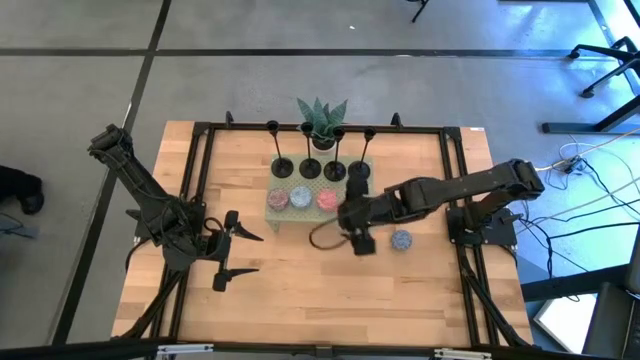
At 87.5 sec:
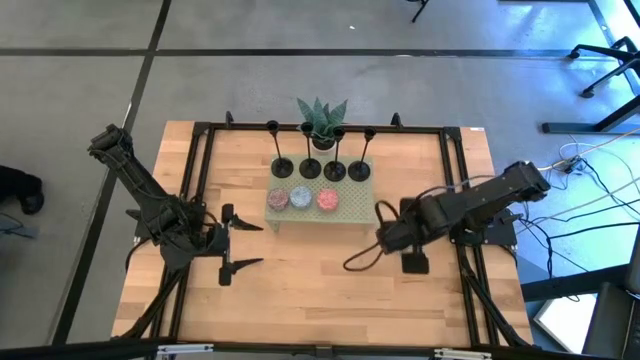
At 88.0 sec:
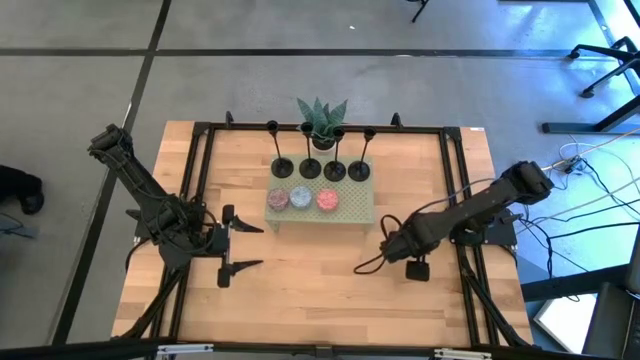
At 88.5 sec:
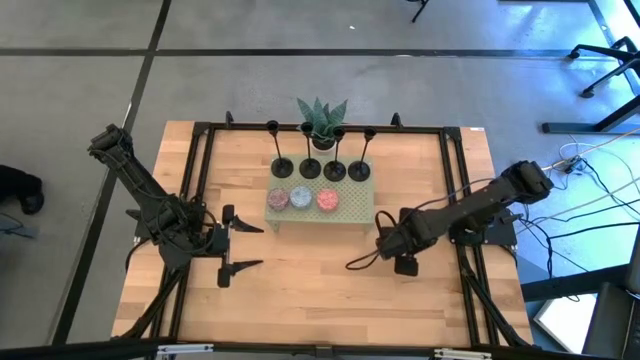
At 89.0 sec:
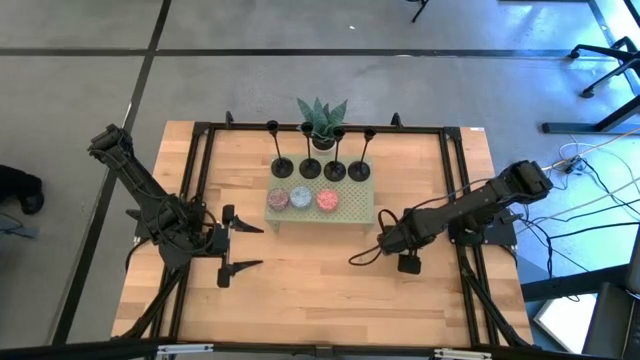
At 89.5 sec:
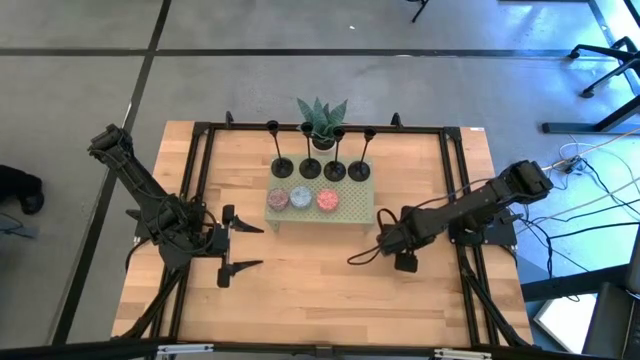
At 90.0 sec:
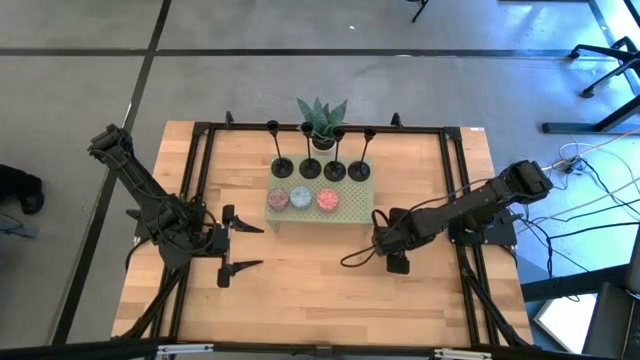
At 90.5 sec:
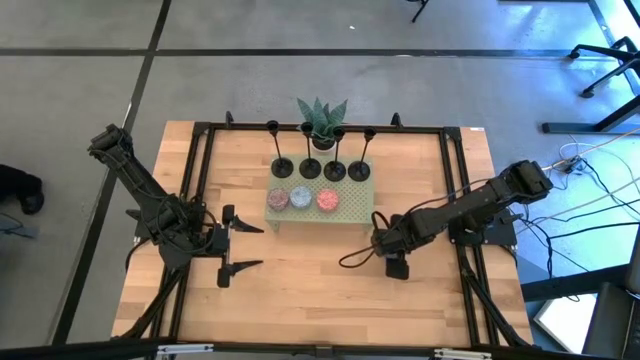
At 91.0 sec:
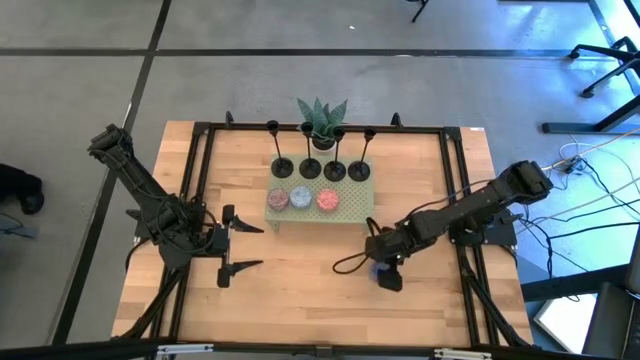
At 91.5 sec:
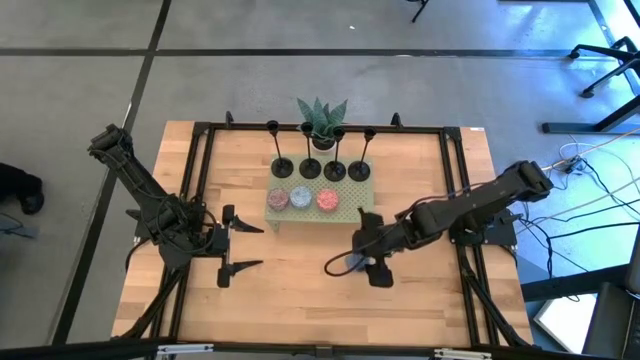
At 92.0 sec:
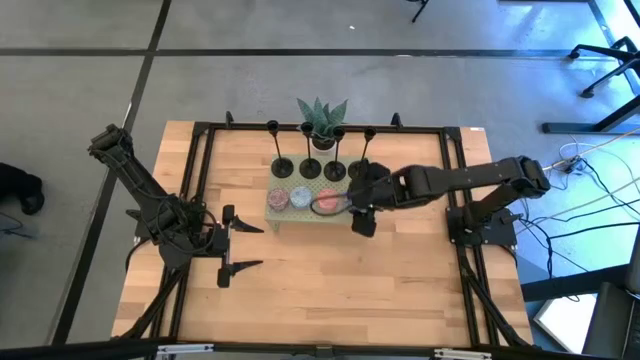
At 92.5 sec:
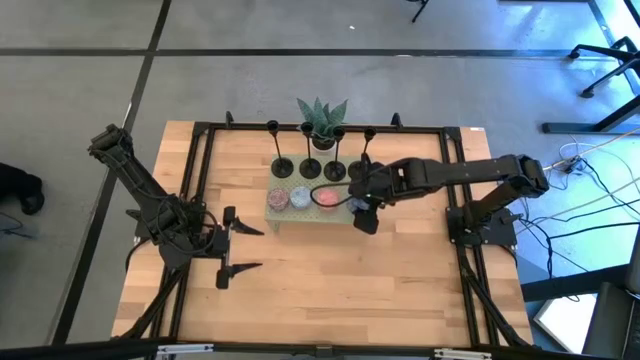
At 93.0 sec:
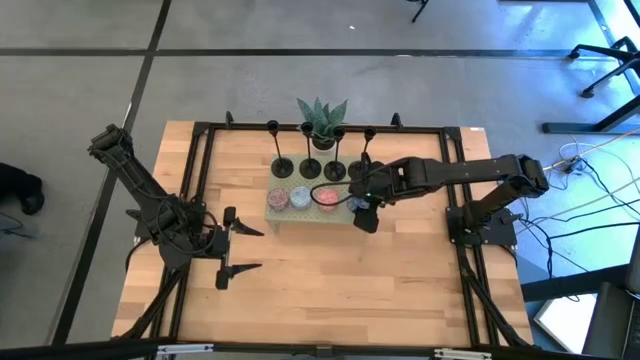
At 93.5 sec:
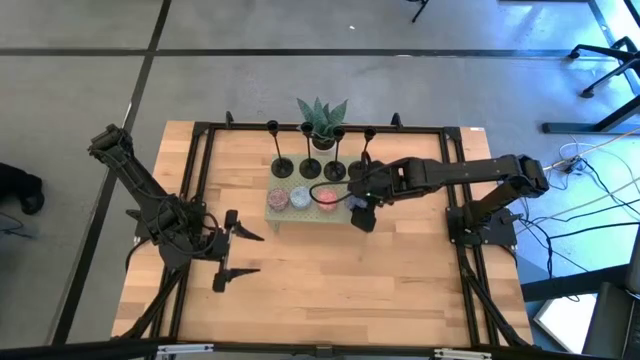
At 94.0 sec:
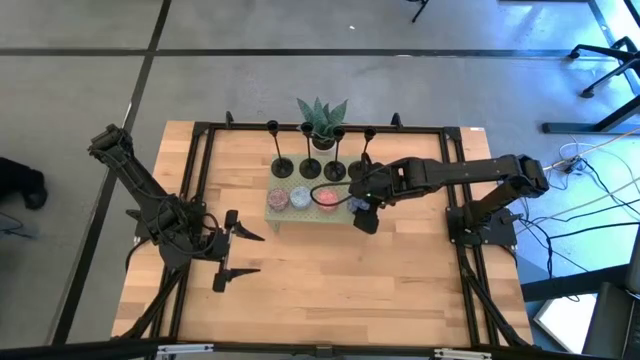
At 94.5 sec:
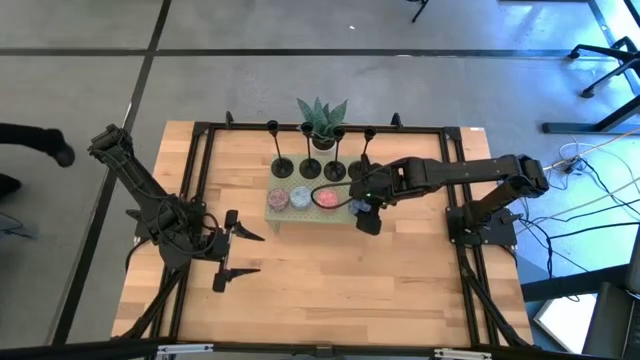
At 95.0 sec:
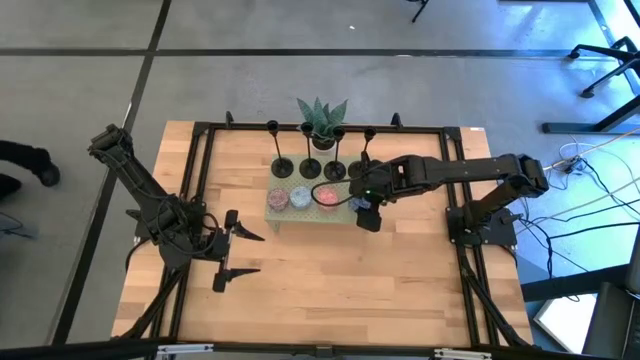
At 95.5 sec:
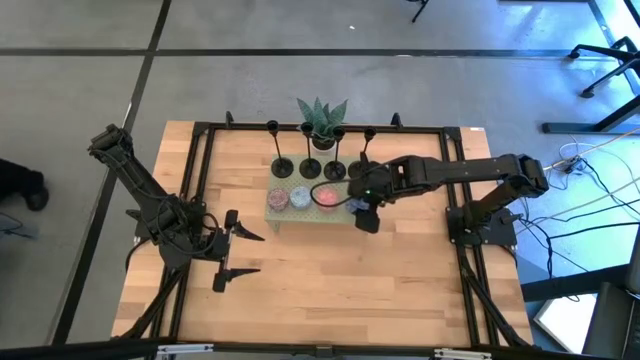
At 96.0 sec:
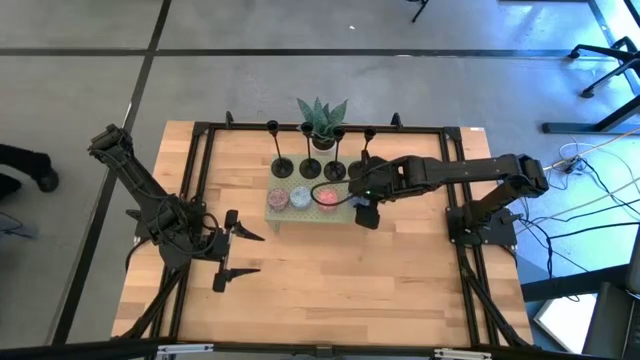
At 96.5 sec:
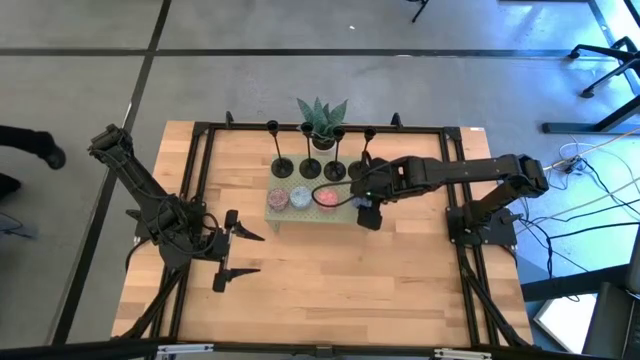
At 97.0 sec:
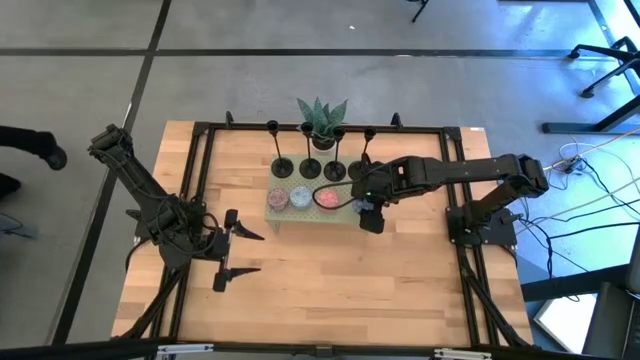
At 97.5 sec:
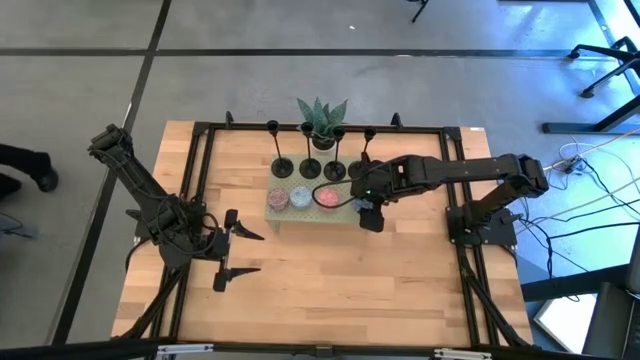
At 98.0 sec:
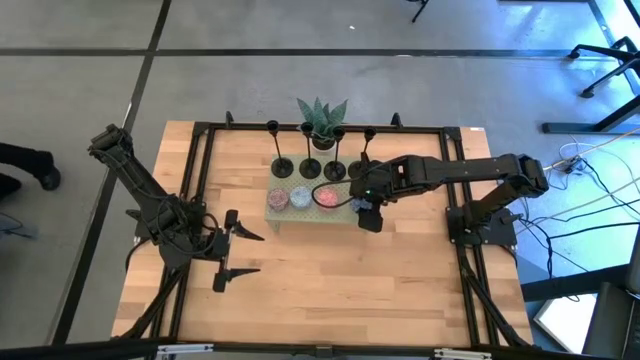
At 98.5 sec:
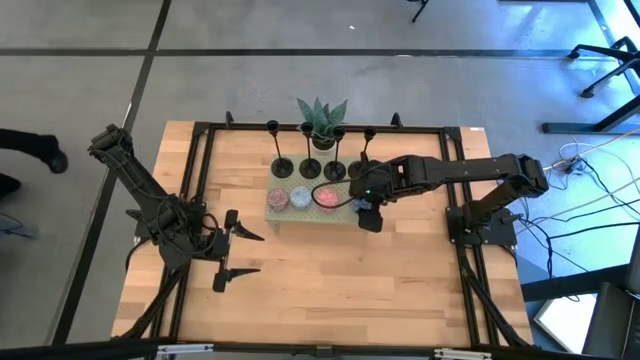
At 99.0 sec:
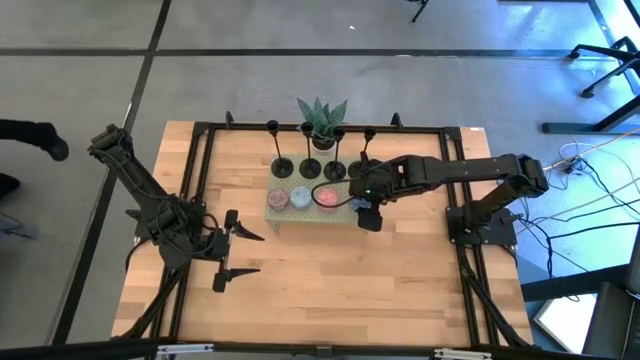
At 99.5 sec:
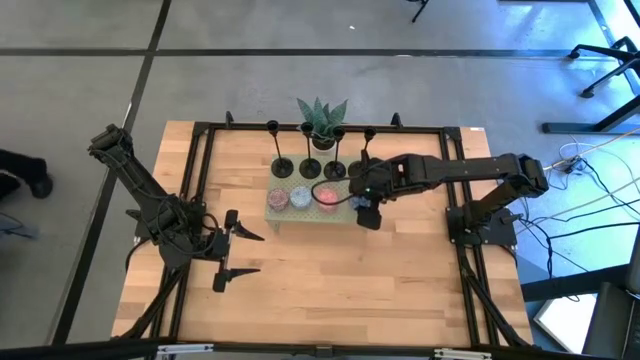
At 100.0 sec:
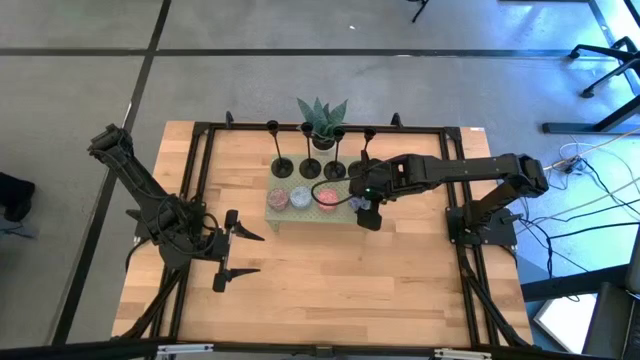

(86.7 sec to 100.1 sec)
Task: Pick & Place candle stick holders
Put the blue scented candle on the shelf

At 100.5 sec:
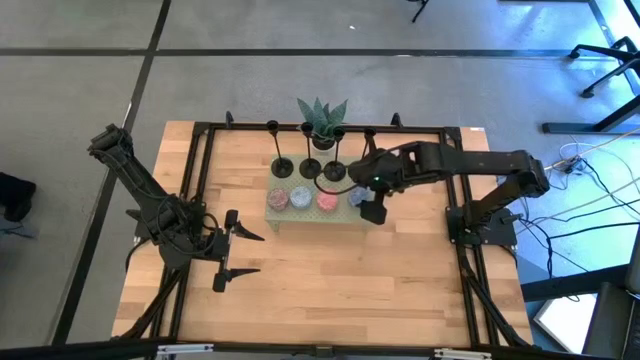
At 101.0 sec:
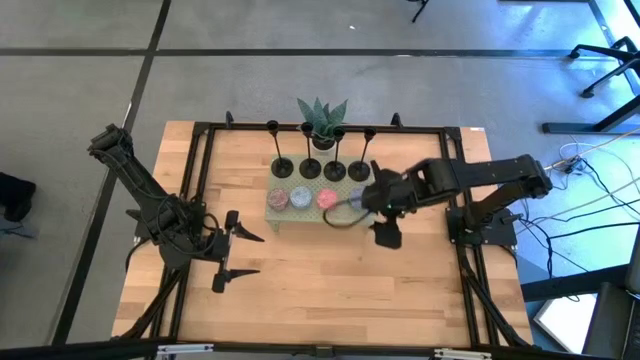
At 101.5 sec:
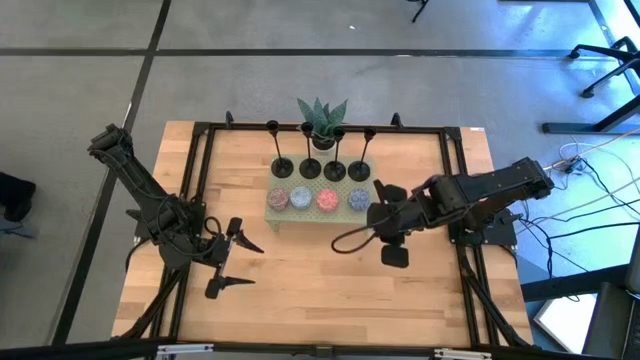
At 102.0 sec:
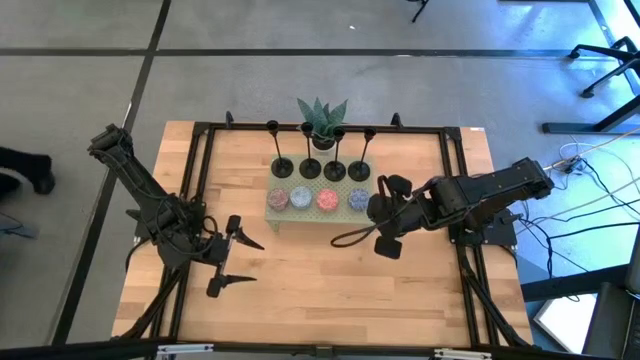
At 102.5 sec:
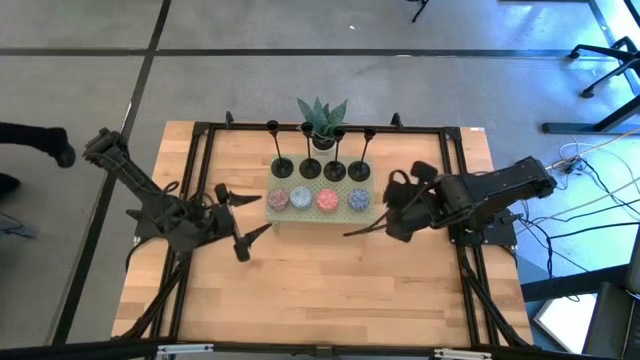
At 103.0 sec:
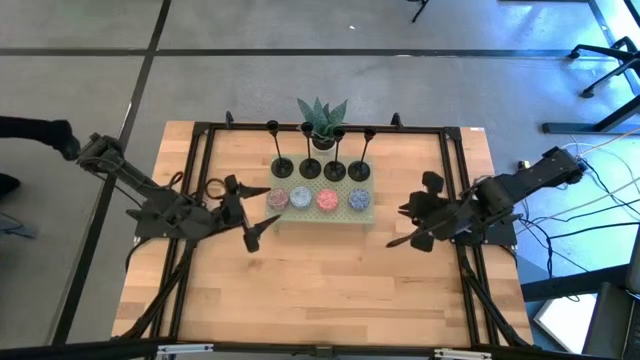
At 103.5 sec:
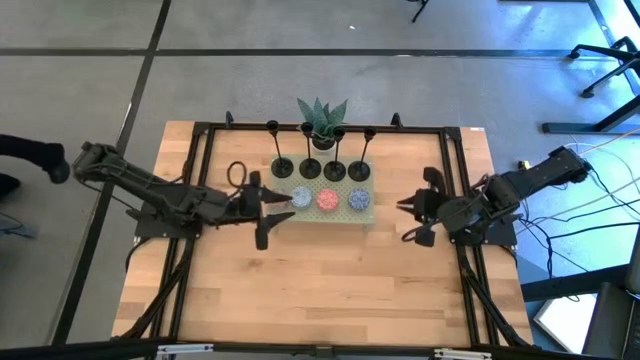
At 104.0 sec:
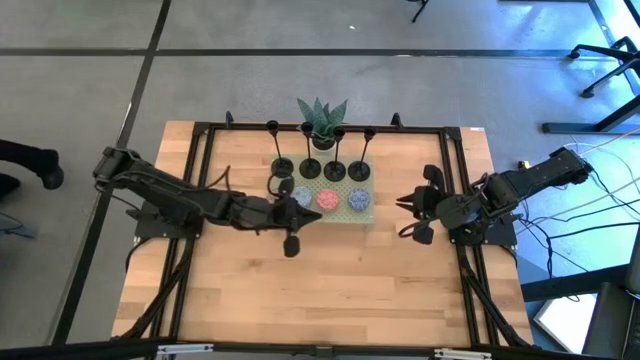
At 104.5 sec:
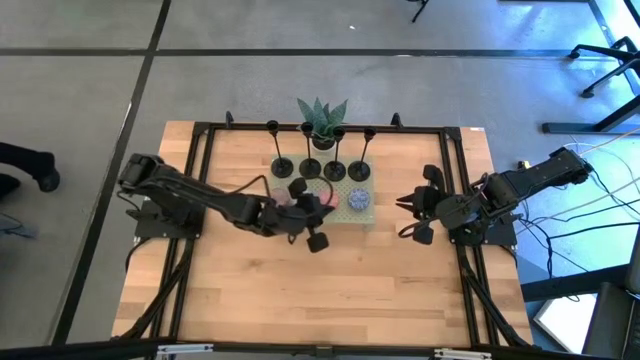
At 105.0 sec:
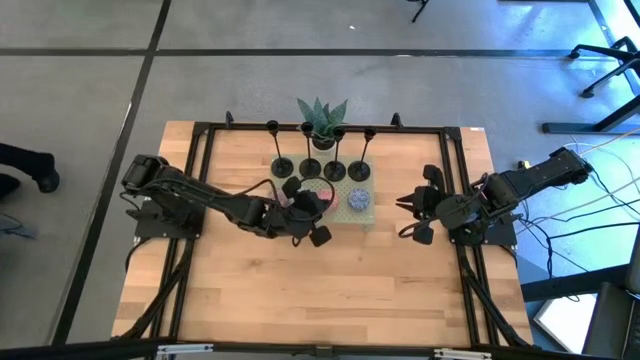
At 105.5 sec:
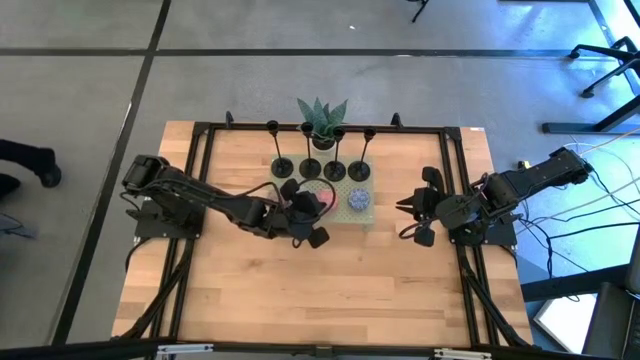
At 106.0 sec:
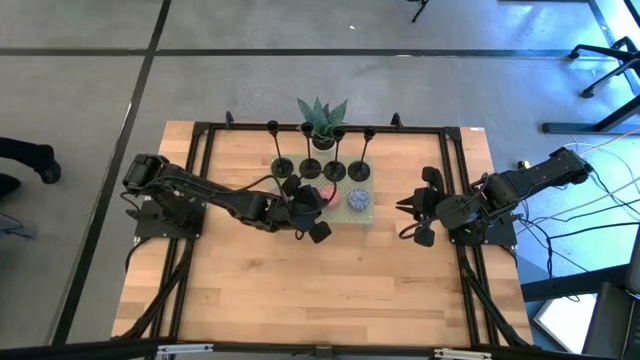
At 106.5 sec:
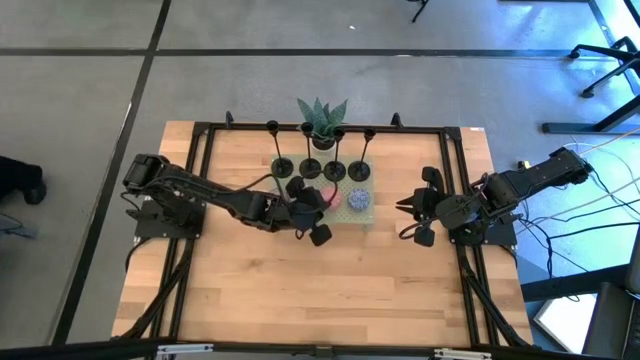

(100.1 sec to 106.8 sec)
Adjust the pink scented candle on the shelf

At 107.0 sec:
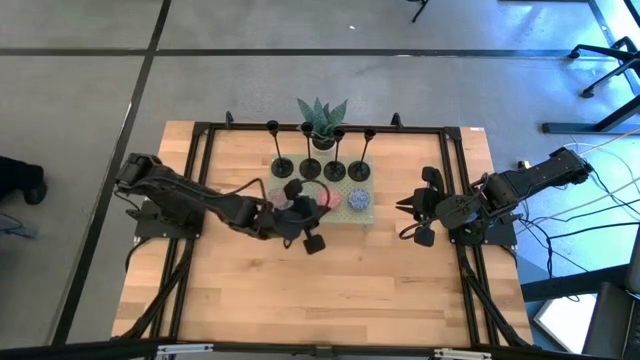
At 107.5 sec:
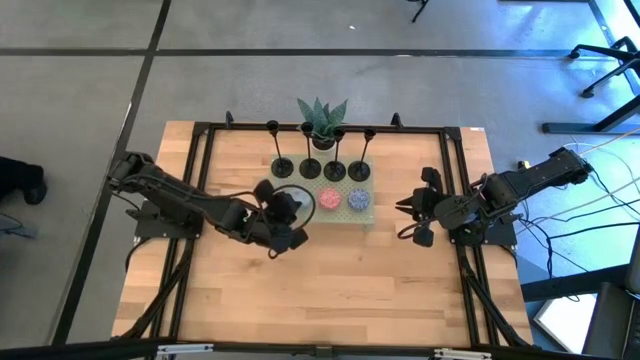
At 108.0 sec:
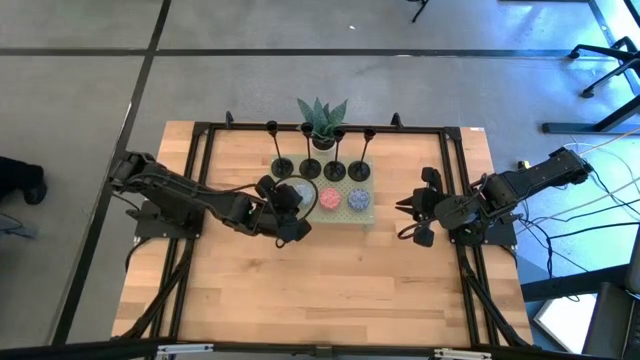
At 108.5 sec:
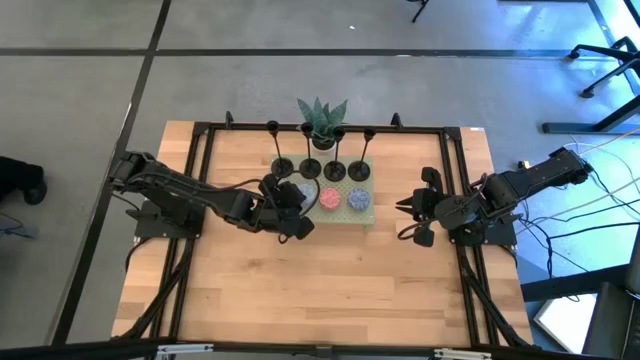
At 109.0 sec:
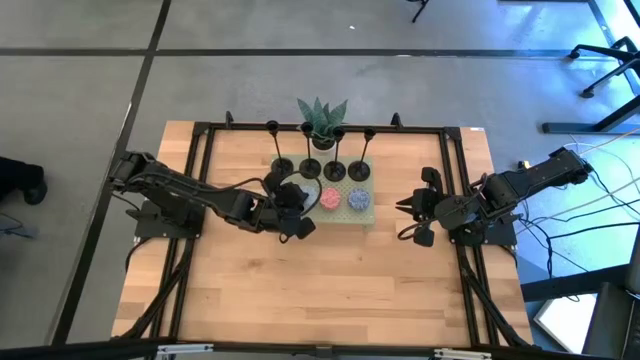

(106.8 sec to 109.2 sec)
Adjust the light blue scented candle on the shelf
